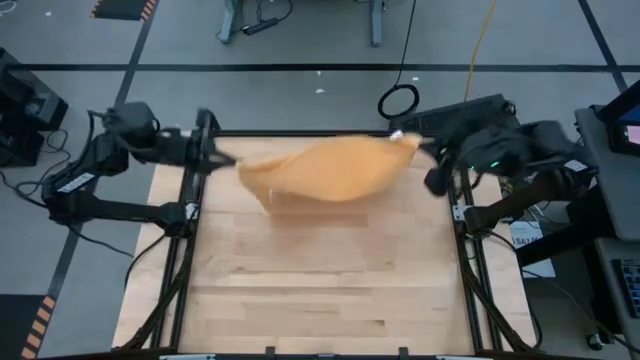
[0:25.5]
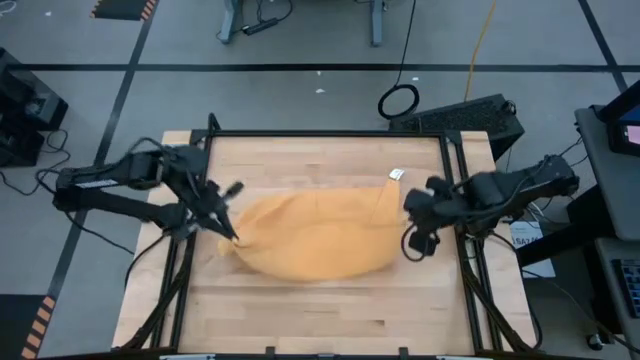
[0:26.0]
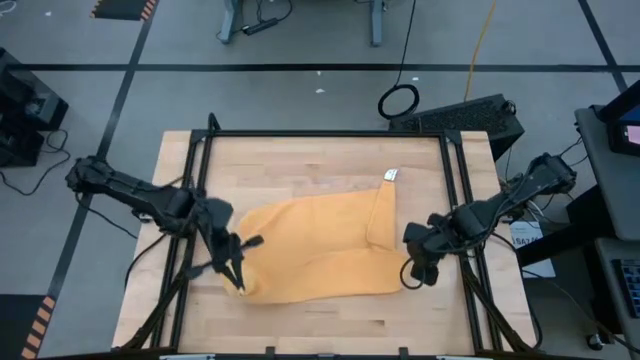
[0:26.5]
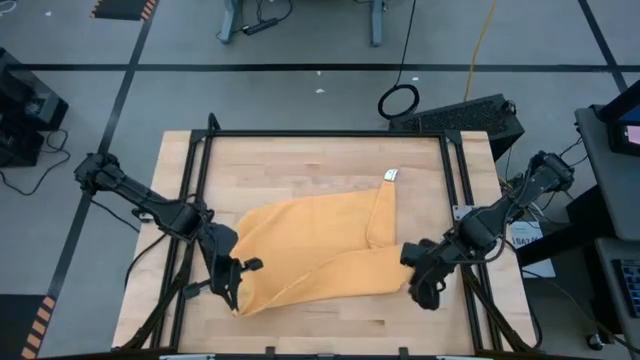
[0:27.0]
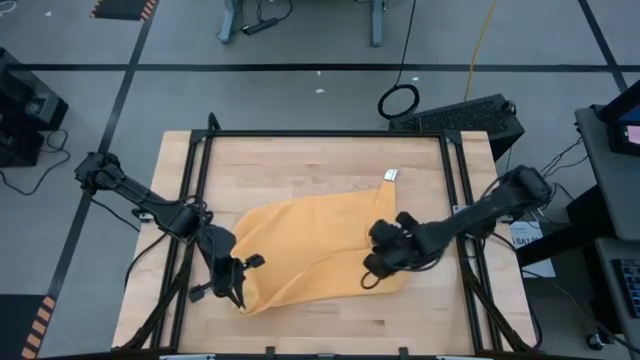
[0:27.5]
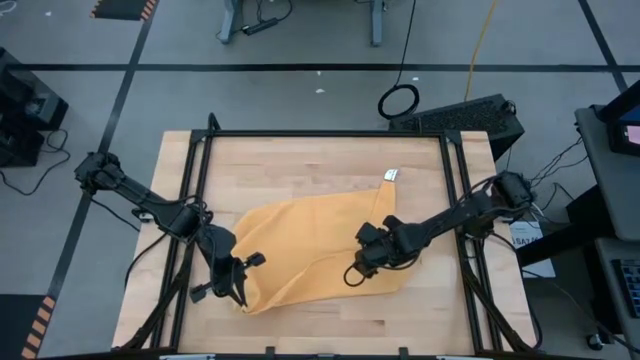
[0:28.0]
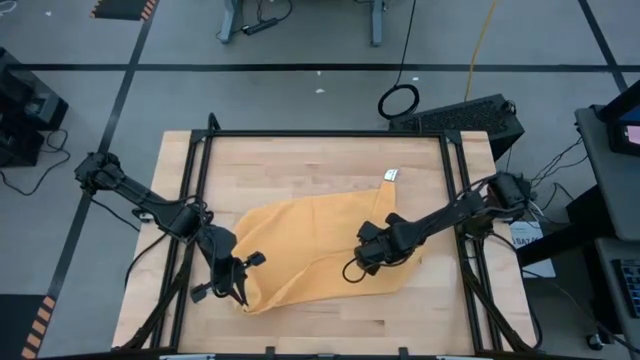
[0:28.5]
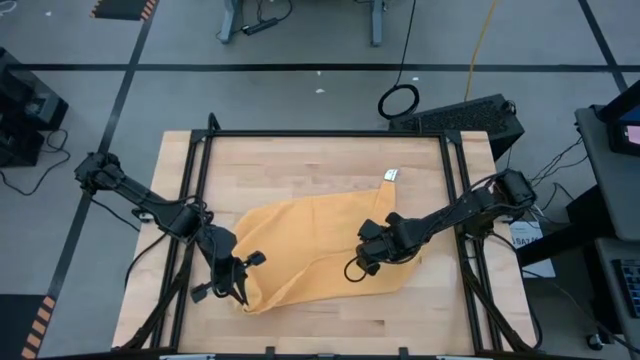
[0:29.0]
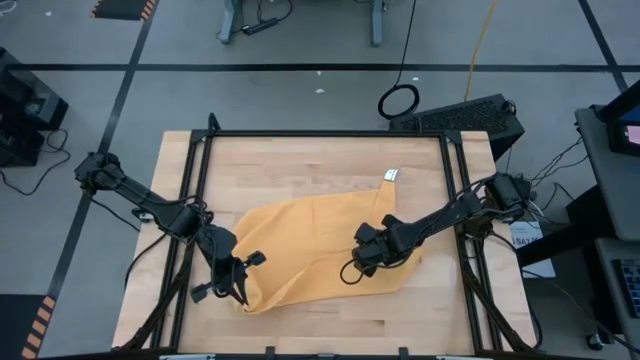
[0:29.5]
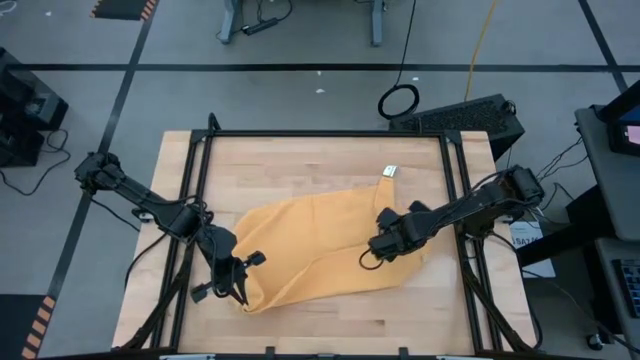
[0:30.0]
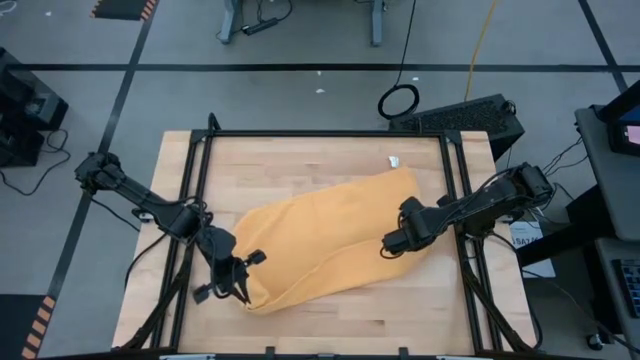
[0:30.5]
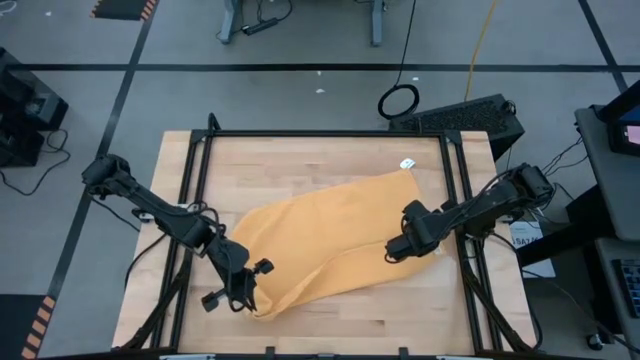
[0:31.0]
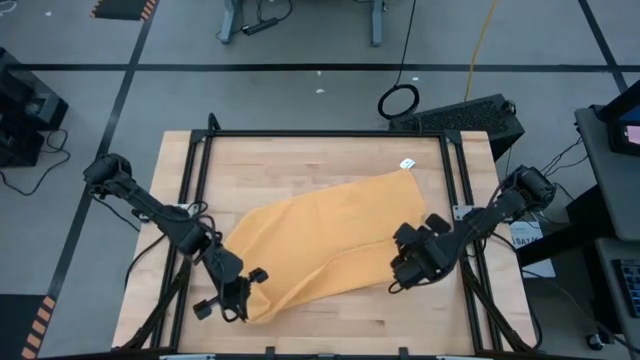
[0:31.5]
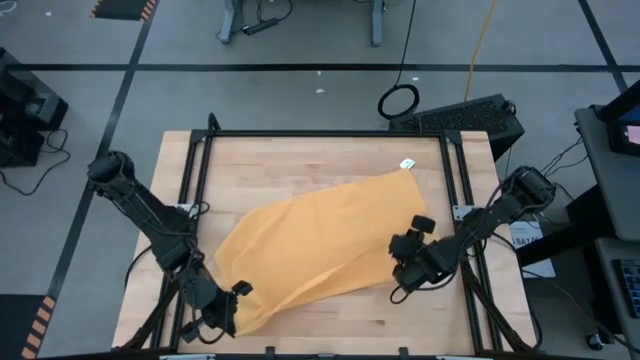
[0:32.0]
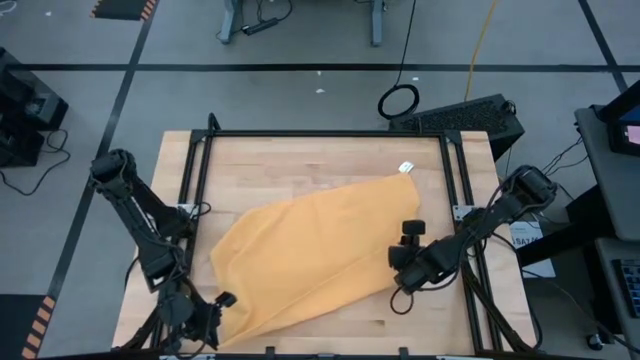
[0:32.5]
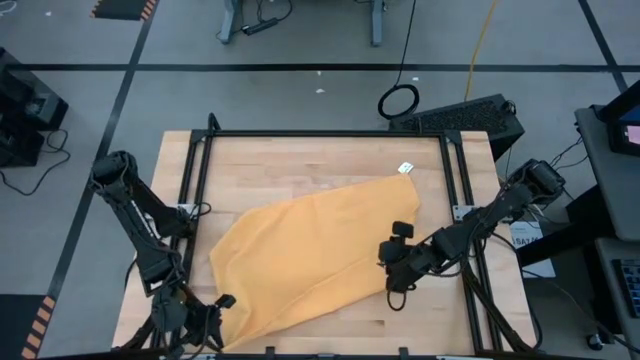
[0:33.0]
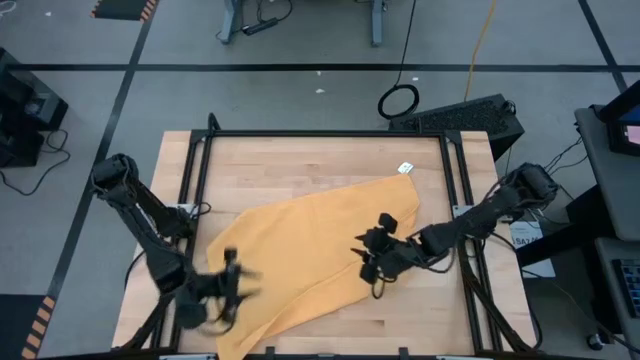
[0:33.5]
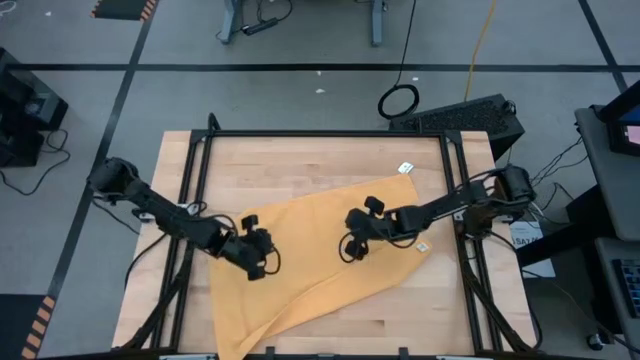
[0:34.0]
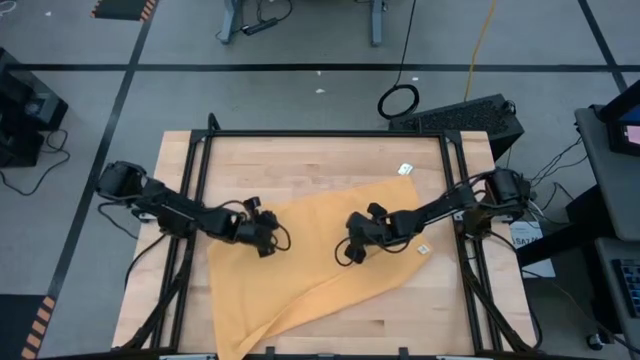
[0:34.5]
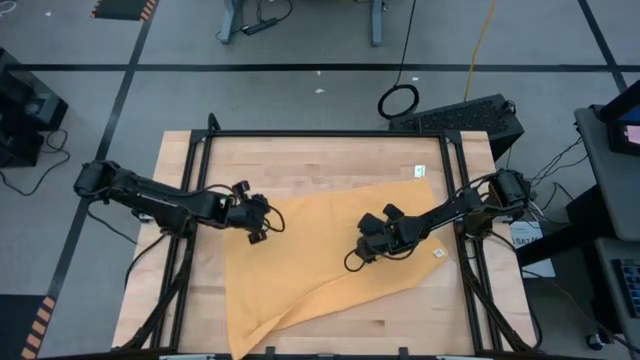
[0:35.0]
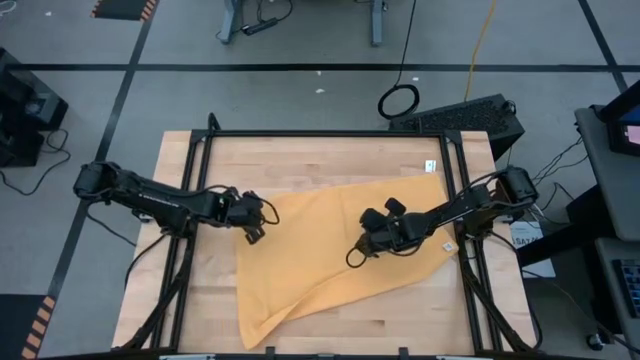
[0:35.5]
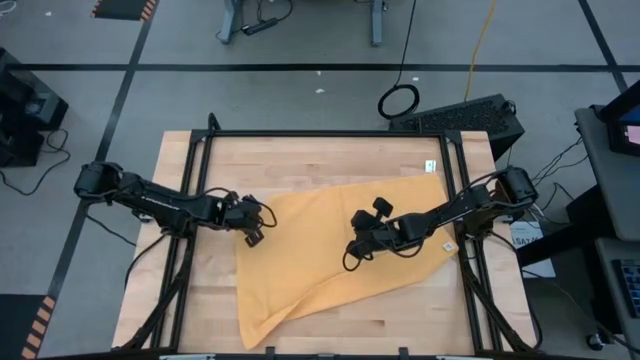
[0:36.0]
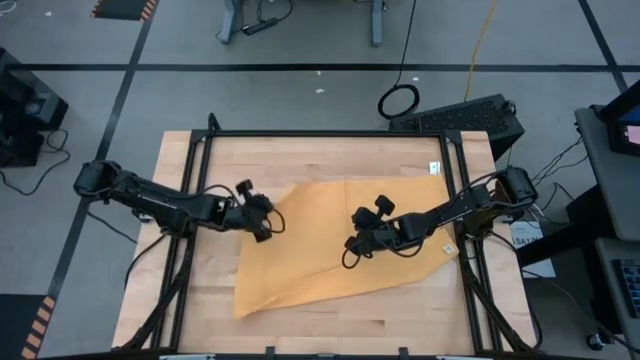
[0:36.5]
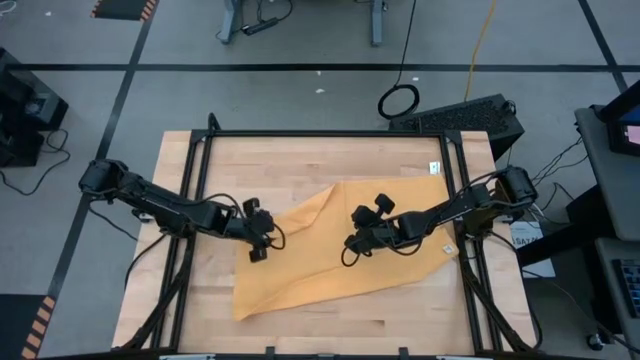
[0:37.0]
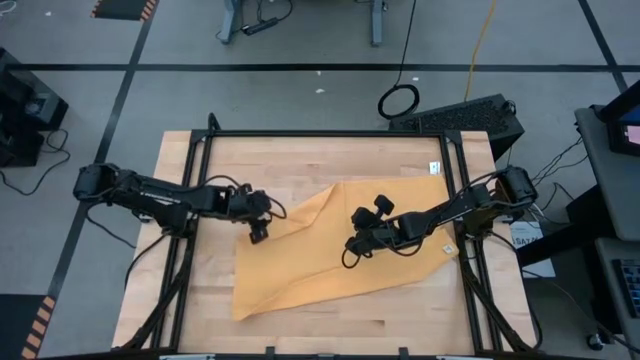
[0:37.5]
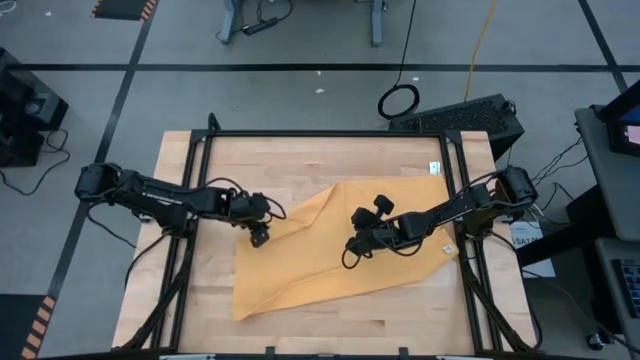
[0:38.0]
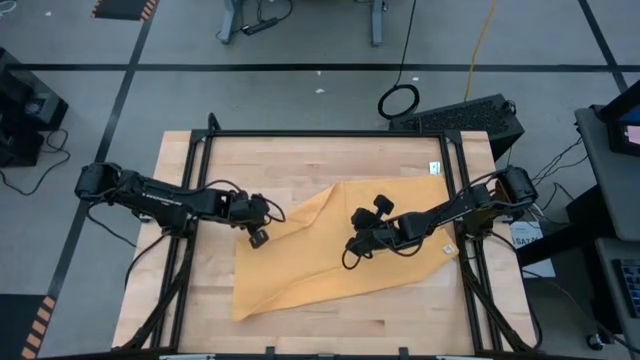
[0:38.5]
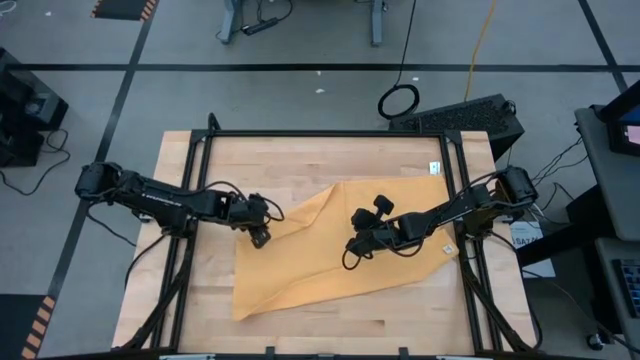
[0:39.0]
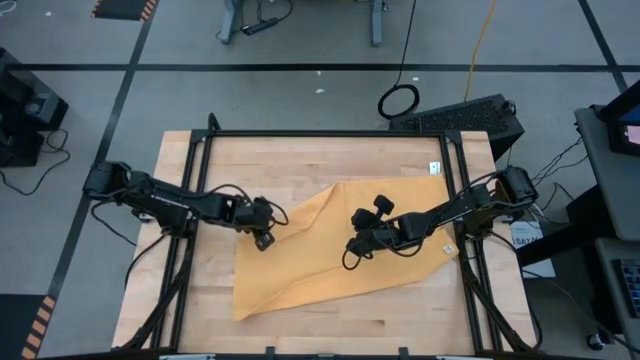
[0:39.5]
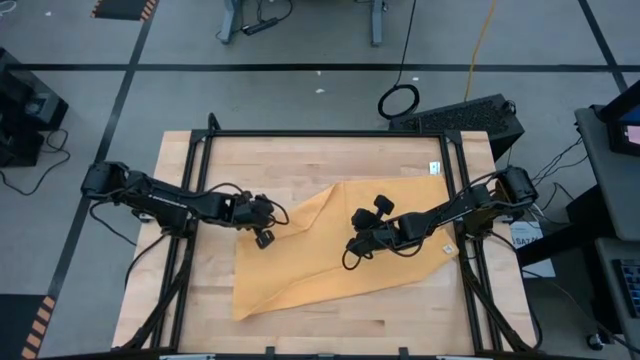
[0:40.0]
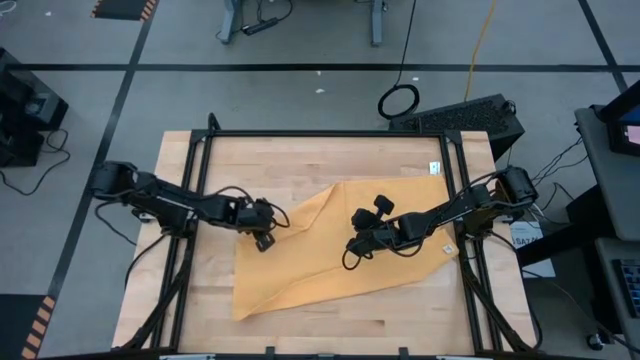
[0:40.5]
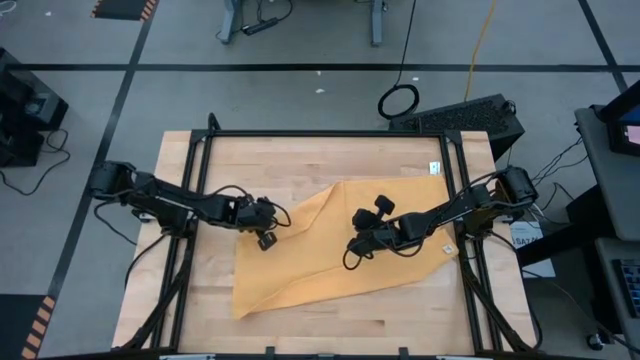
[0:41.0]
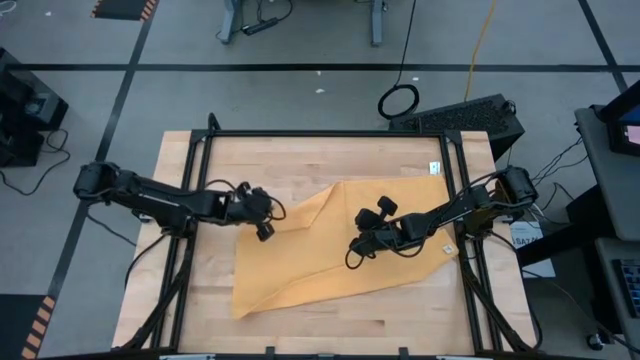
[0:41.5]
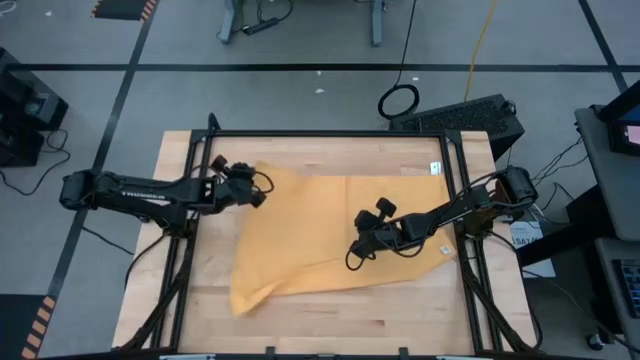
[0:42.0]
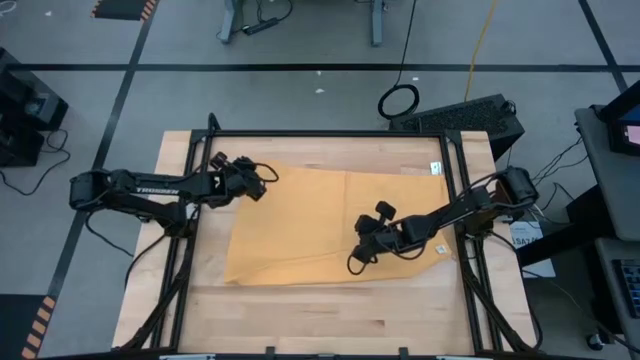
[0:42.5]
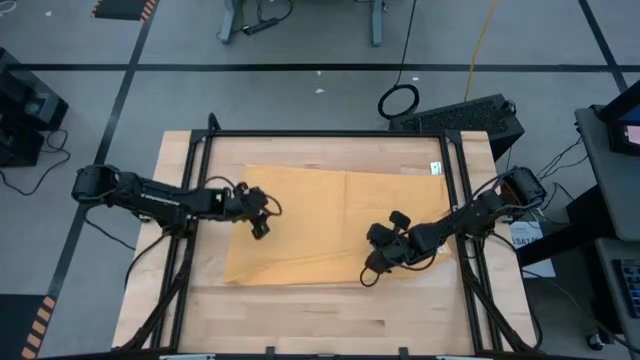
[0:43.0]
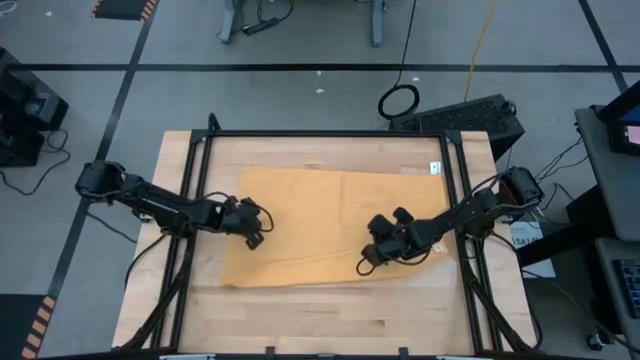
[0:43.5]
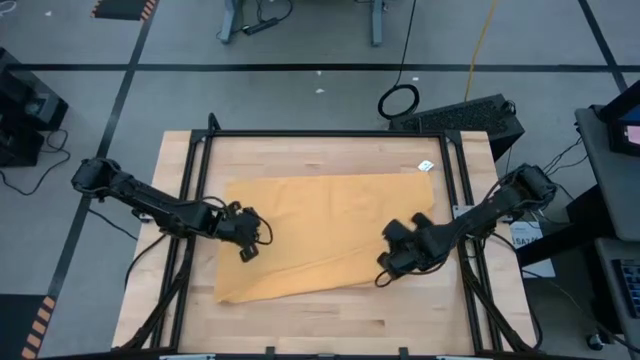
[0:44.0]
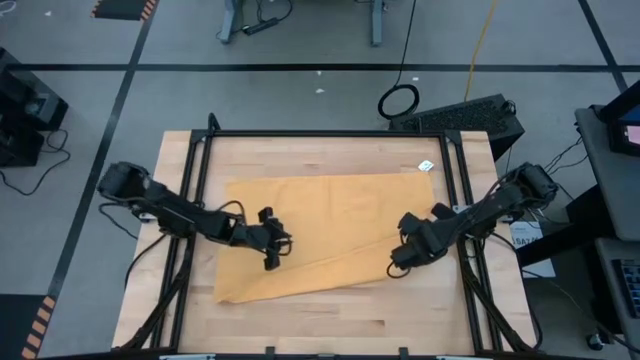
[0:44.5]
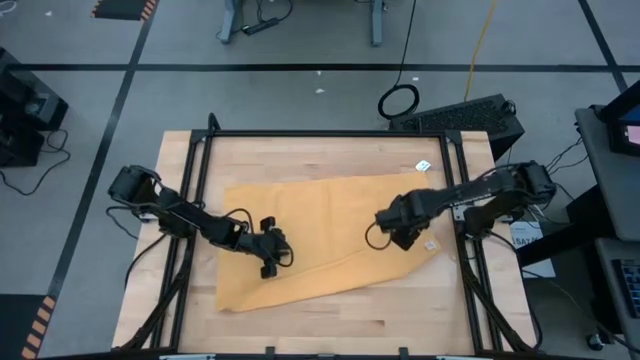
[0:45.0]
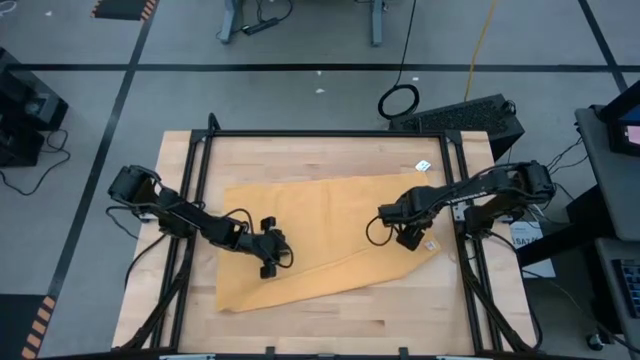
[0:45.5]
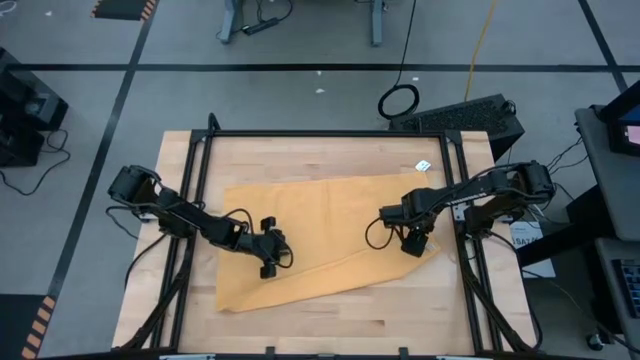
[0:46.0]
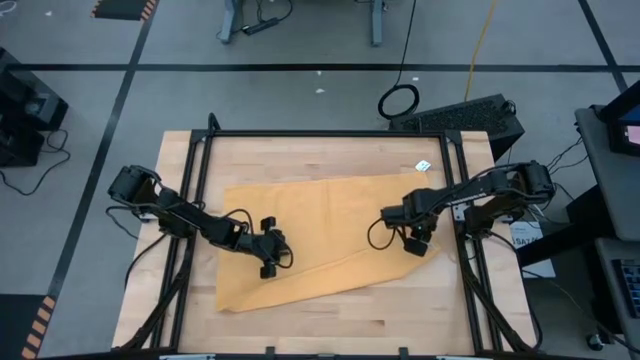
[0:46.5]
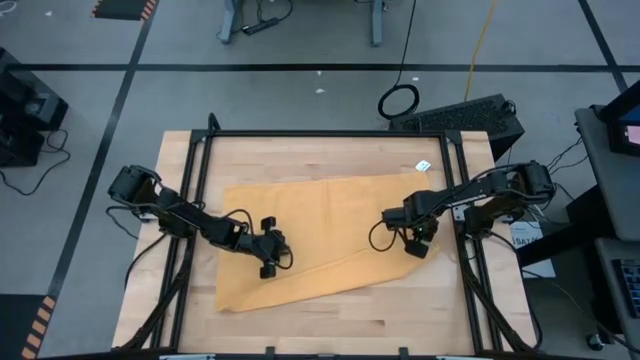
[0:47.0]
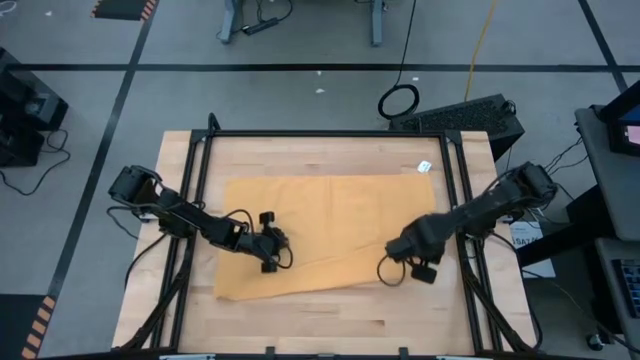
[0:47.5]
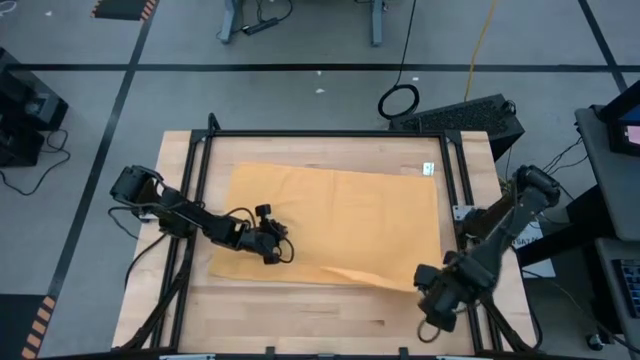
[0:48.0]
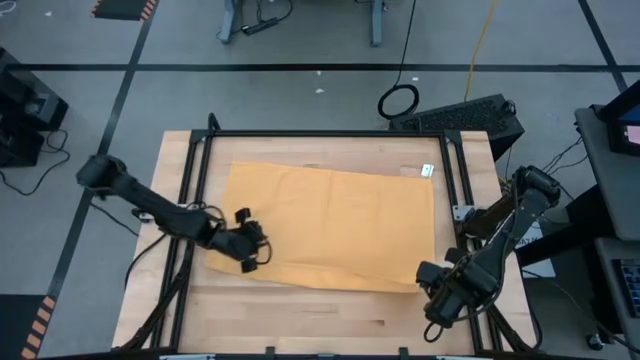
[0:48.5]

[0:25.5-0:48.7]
Task: Roll towel into tight, uniform cylinder
Roll the orange towel
